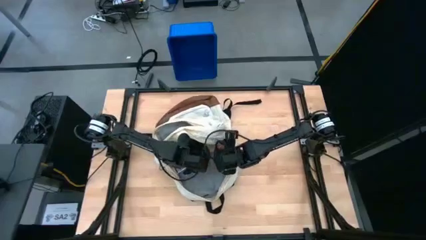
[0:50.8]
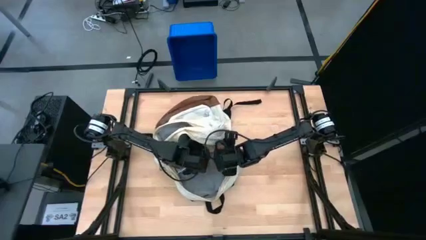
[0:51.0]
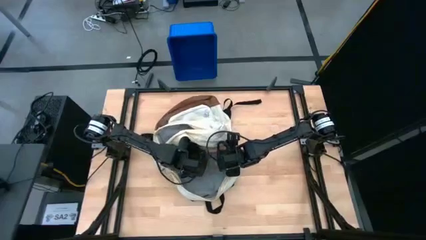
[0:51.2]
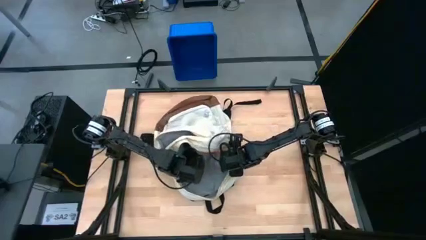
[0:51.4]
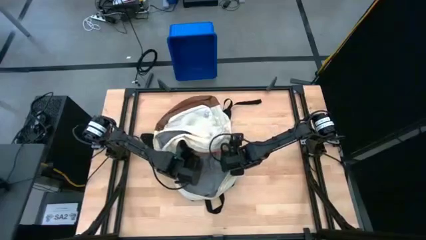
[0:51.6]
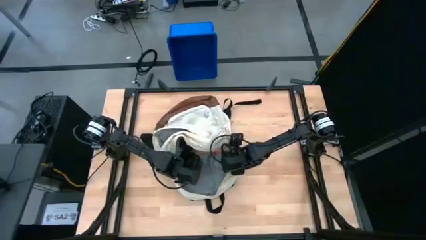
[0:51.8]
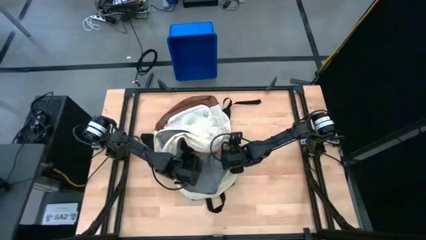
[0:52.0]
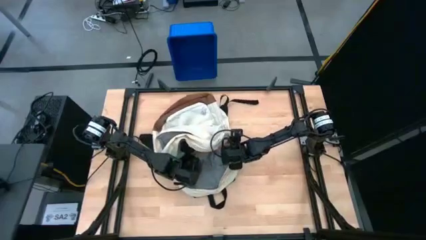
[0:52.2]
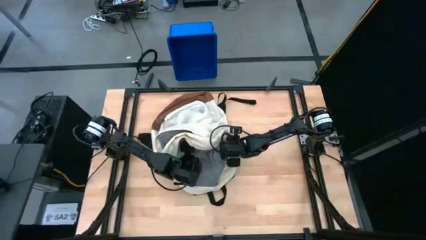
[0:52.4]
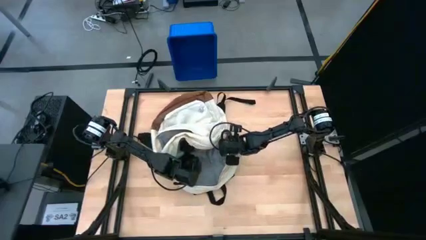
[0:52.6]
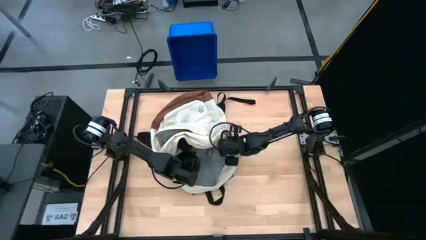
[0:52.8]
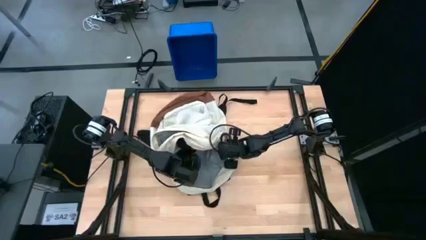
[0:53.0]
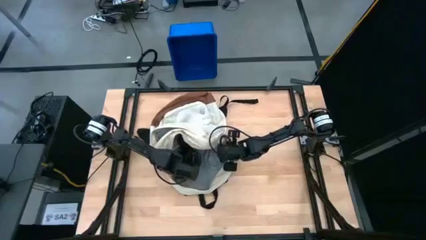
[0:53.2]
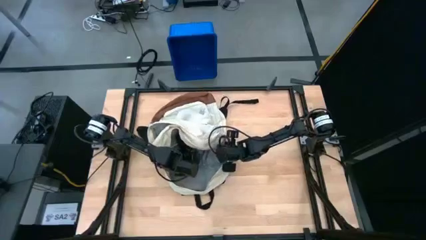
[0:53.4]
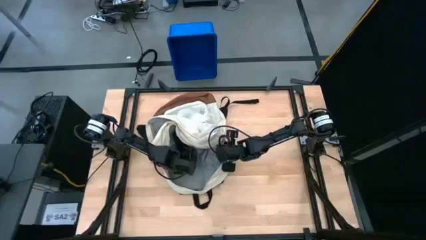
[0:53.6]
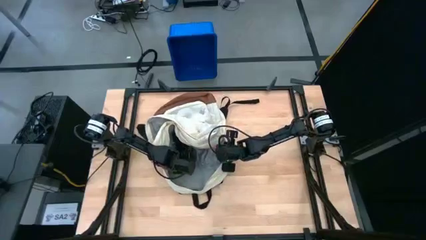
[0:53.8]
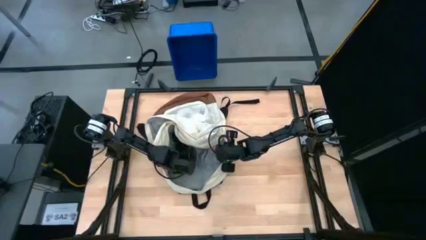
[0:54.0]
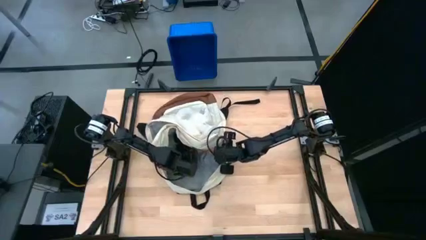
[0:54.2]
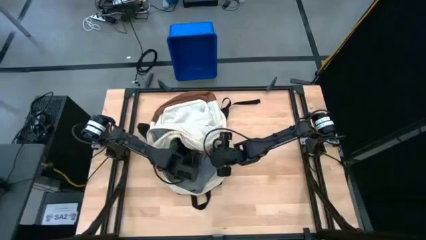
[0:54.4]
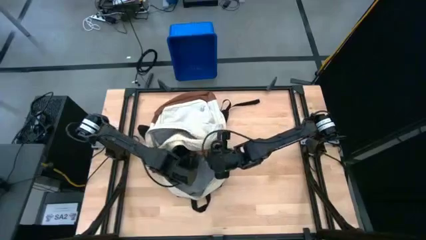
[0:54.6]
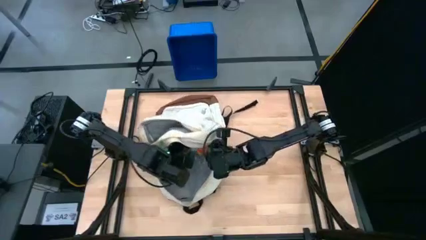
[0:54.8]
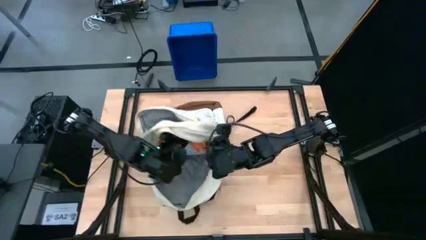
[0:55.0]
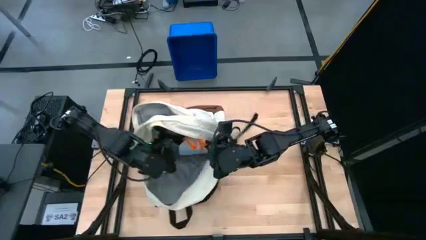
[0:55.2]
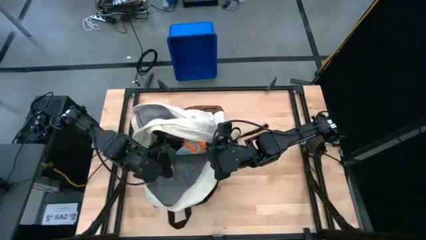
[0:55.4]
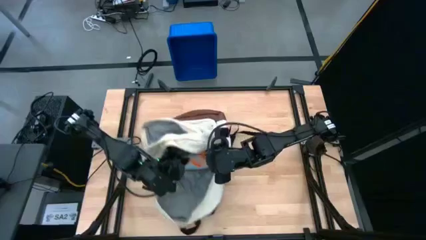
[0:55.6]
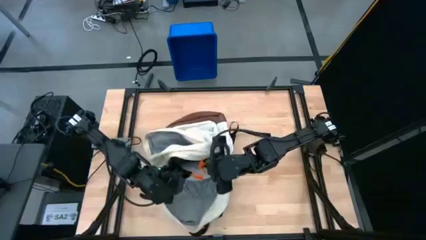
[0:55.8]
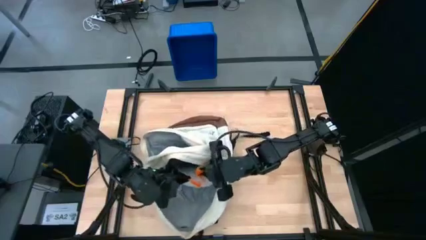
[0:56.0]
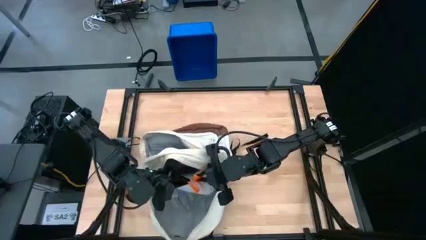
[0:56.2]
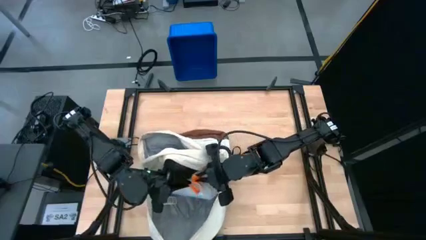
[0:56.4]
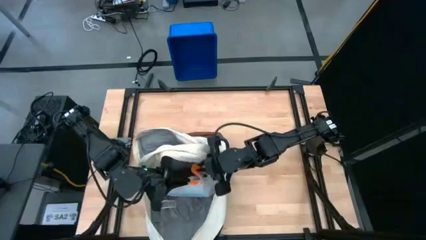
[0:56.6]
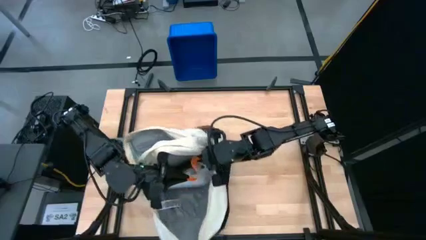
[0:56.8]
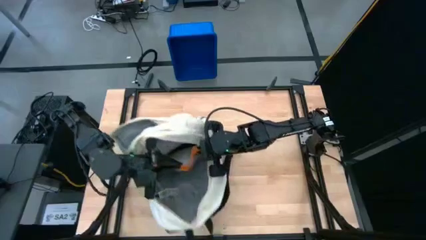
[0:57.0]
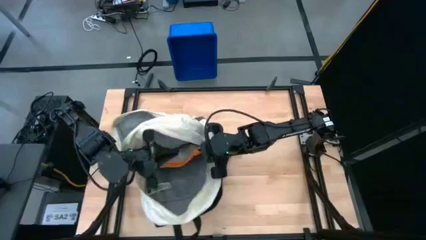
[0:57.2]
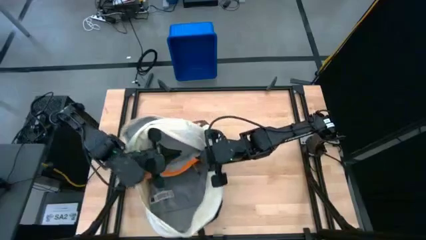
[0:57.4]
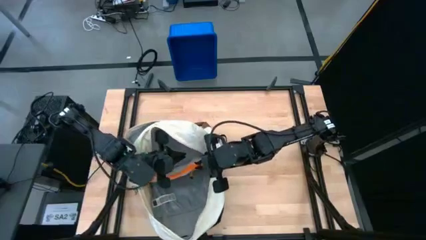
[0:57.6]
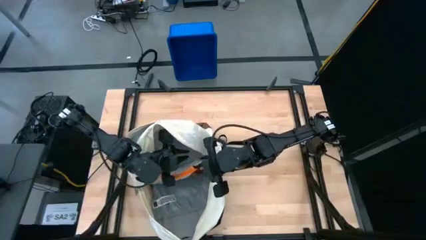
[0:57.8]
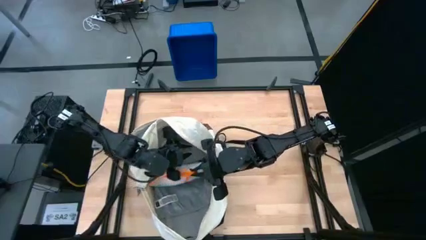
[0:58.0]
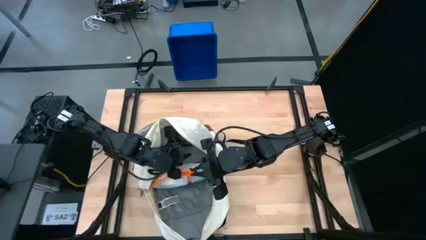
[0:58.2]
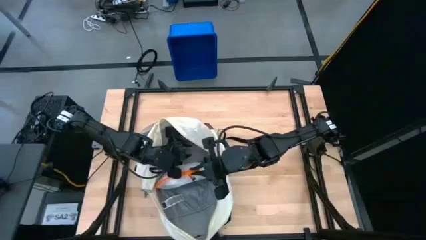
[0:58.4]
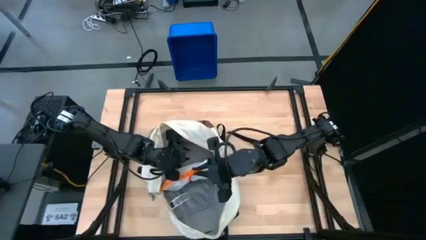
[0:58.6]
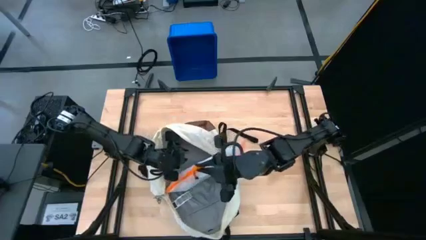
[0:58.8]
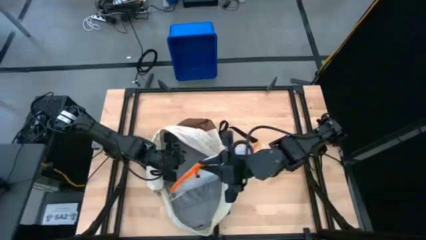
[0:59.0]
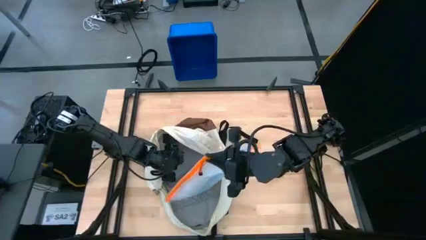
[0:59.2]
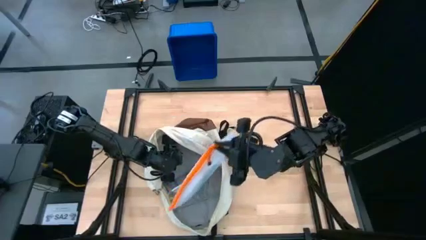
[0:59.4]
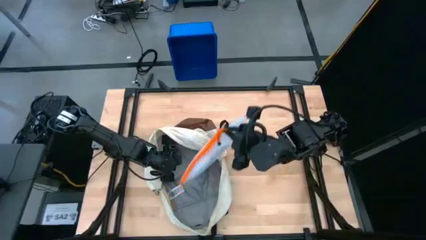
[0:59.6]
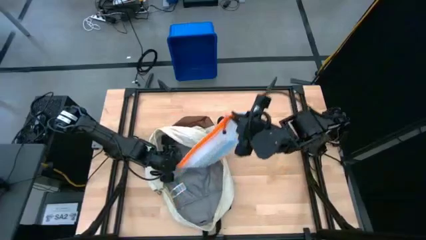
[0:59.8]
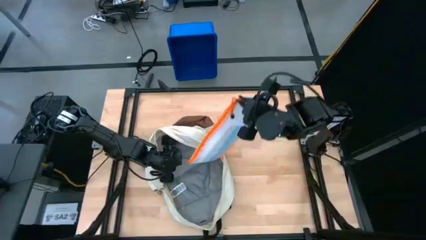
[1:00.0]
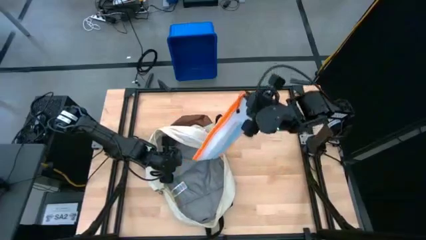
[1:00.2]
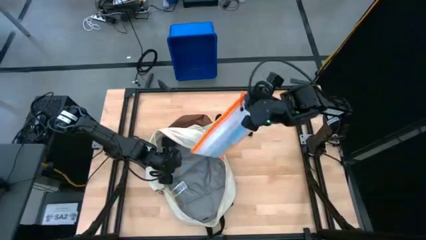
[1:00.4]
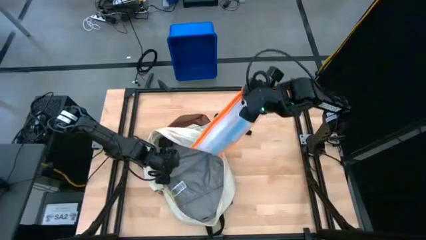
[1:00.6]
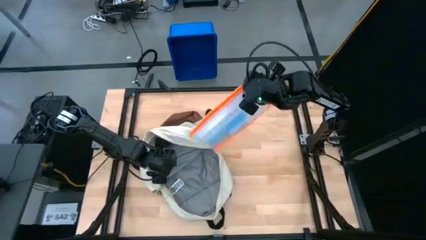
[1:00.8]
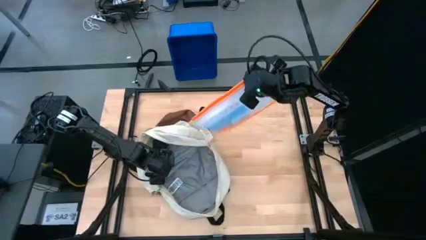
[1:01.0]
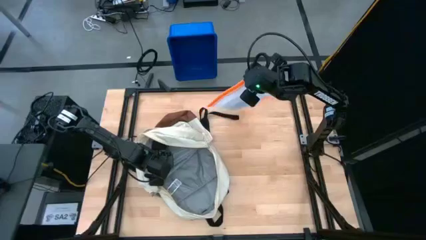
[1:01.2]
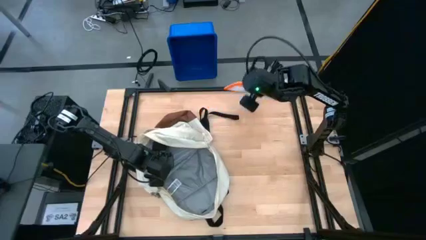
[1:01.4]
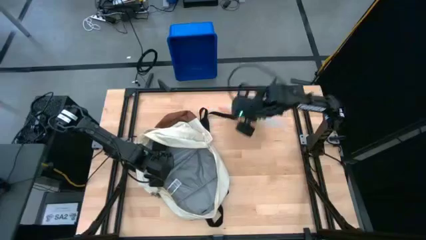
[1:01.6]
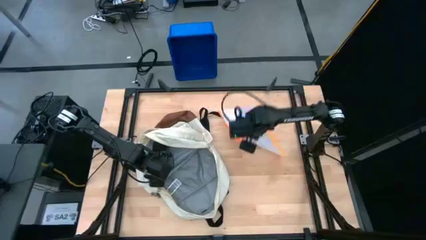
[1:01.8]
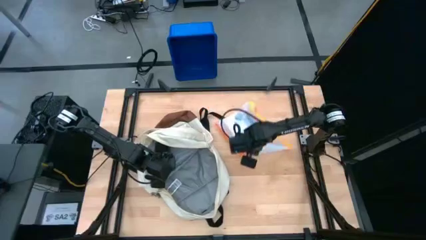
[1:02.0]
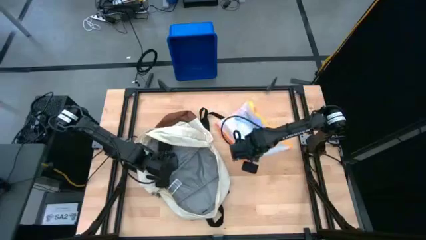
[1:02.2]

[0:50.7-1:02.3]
Task: Unpack backpack
Remove the zip bag from the white backpack
